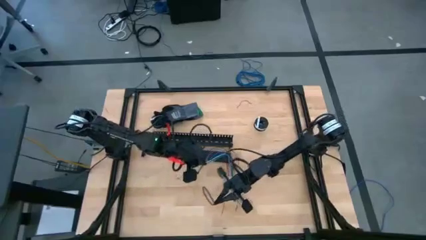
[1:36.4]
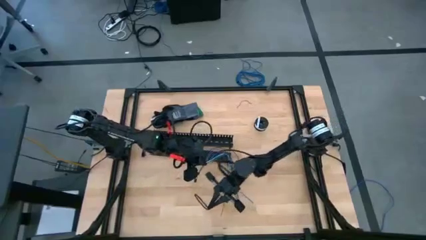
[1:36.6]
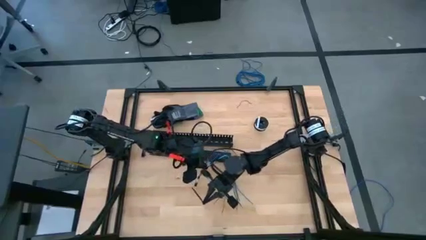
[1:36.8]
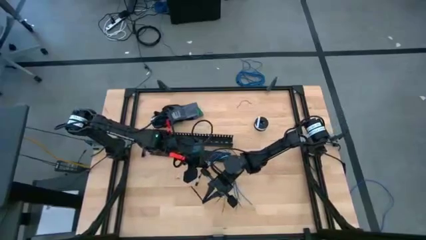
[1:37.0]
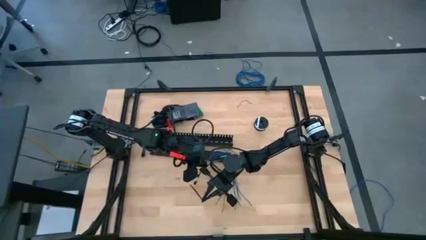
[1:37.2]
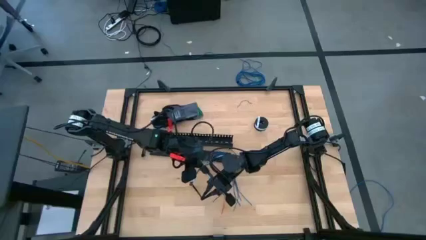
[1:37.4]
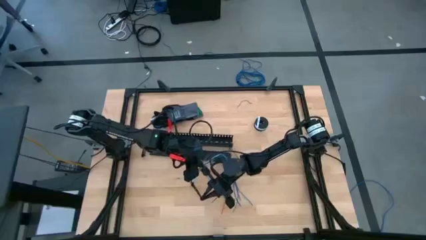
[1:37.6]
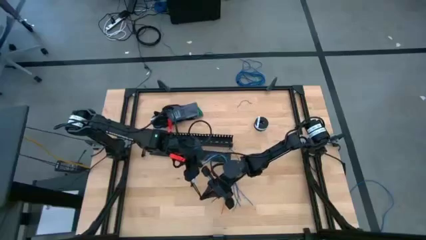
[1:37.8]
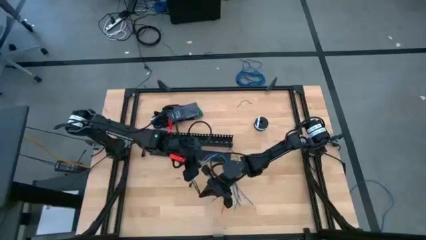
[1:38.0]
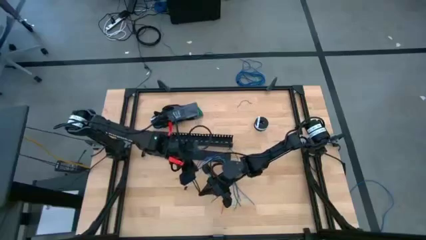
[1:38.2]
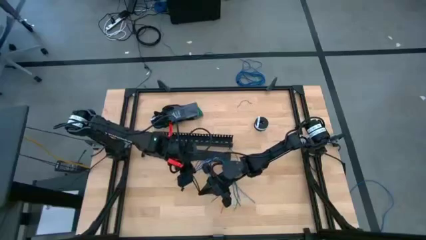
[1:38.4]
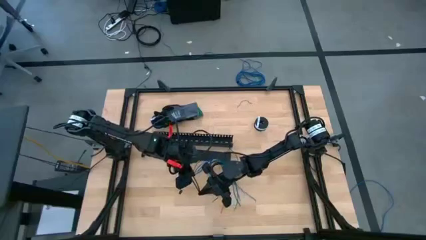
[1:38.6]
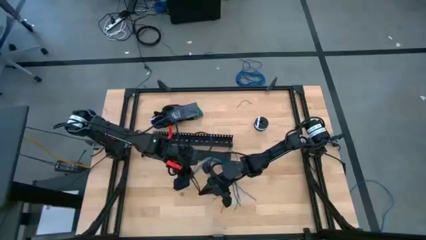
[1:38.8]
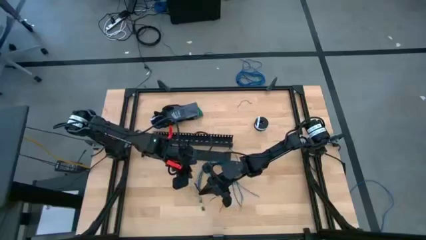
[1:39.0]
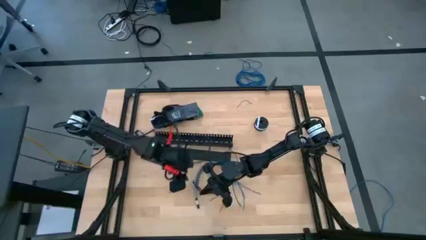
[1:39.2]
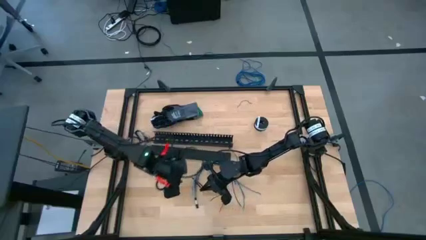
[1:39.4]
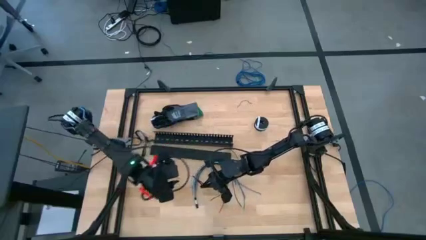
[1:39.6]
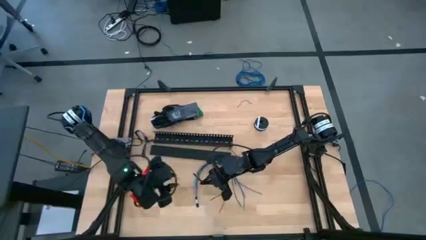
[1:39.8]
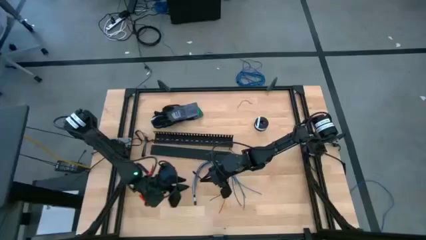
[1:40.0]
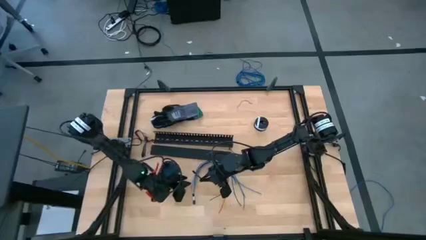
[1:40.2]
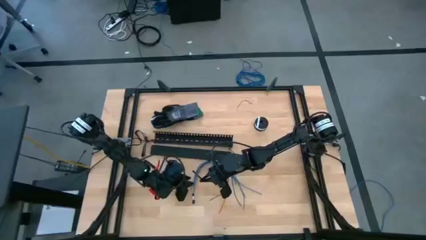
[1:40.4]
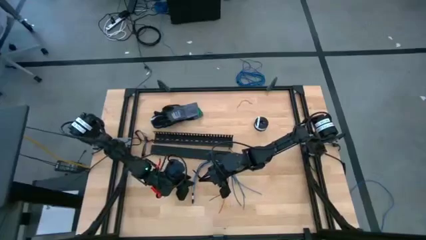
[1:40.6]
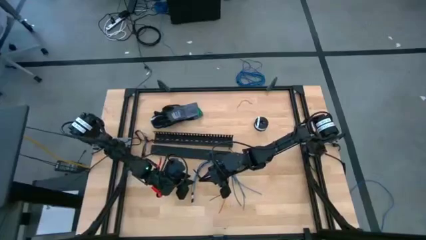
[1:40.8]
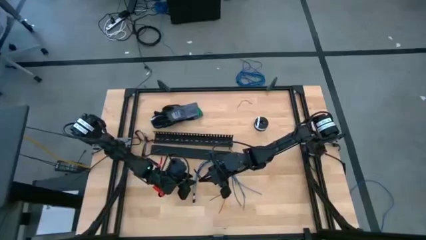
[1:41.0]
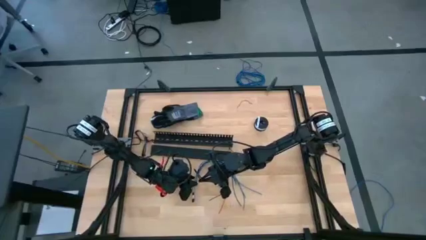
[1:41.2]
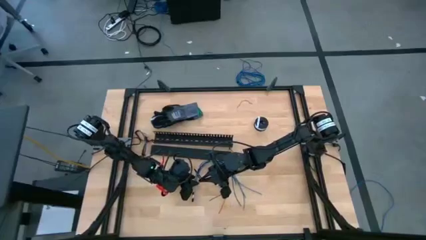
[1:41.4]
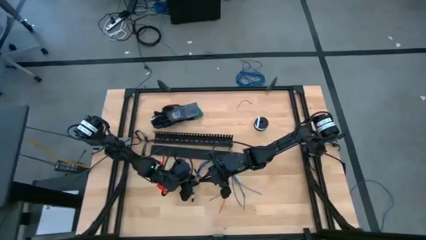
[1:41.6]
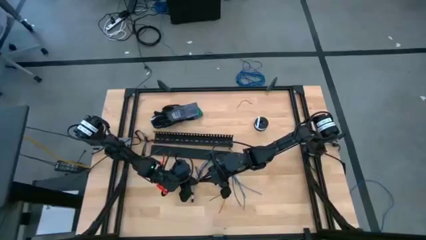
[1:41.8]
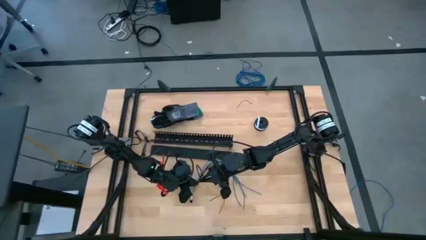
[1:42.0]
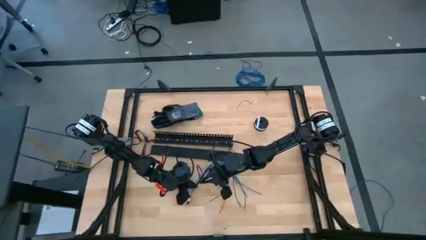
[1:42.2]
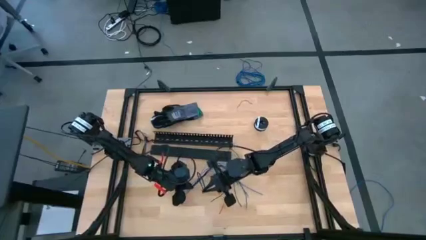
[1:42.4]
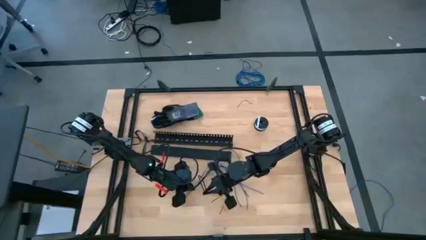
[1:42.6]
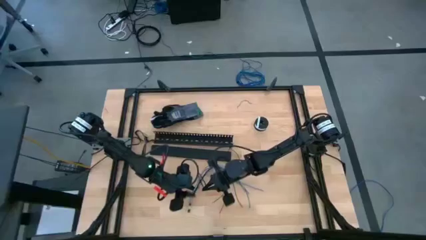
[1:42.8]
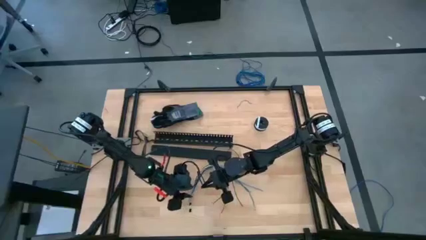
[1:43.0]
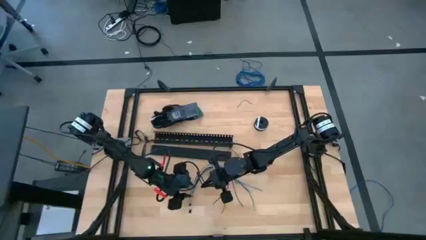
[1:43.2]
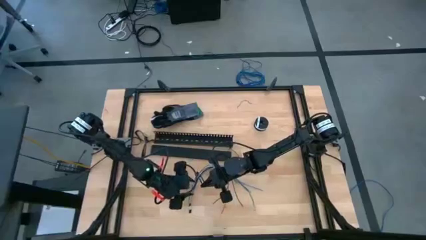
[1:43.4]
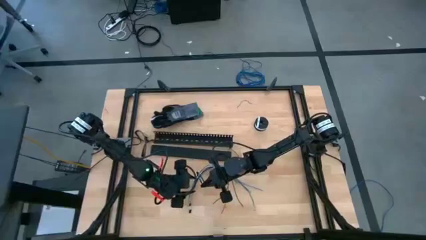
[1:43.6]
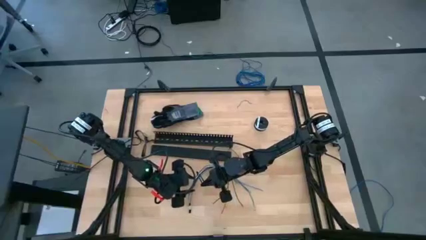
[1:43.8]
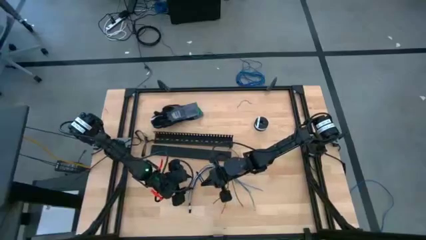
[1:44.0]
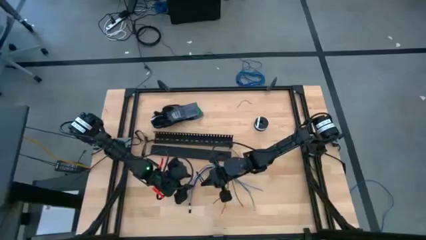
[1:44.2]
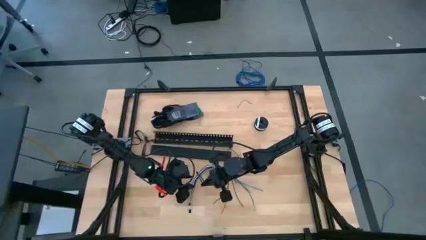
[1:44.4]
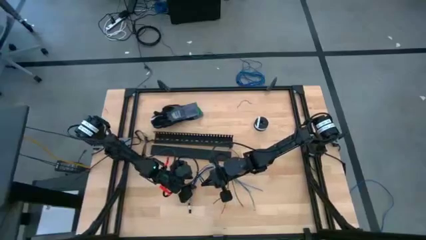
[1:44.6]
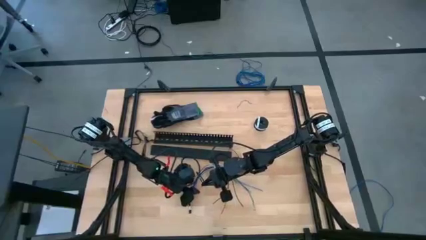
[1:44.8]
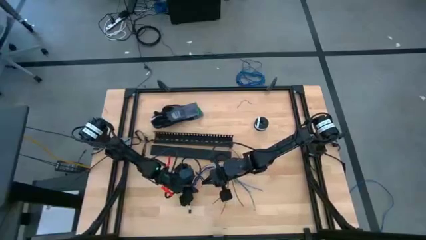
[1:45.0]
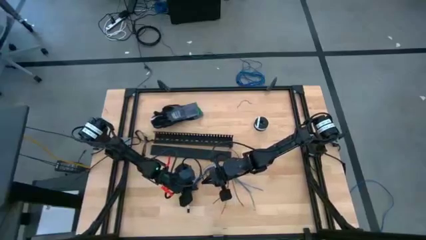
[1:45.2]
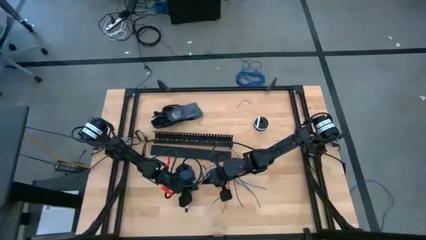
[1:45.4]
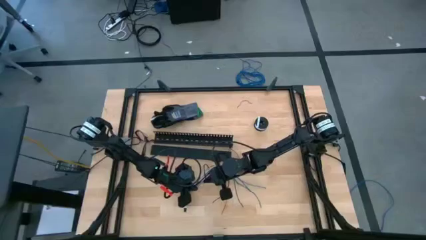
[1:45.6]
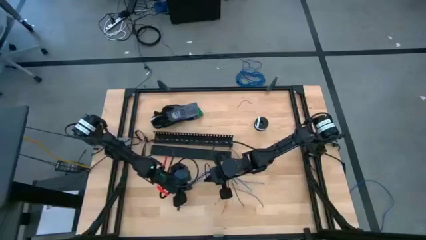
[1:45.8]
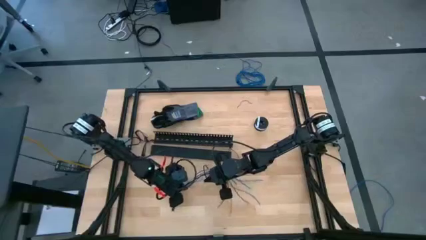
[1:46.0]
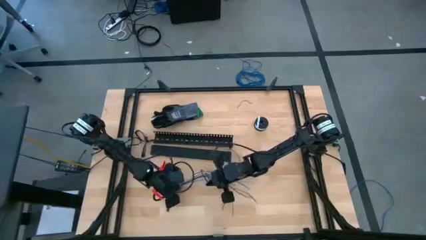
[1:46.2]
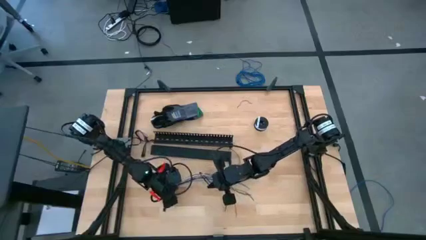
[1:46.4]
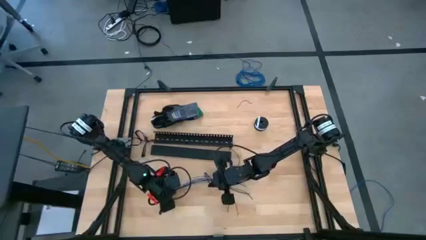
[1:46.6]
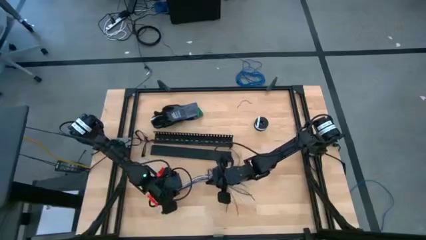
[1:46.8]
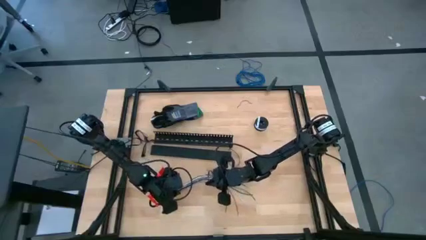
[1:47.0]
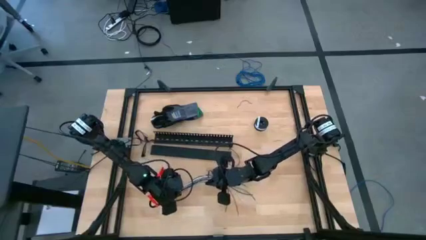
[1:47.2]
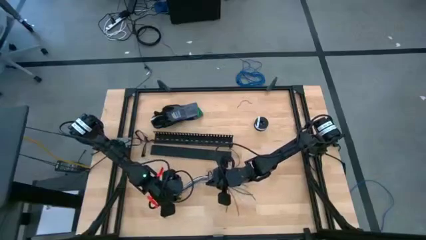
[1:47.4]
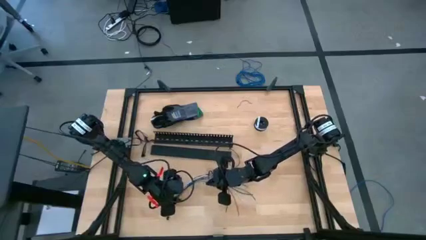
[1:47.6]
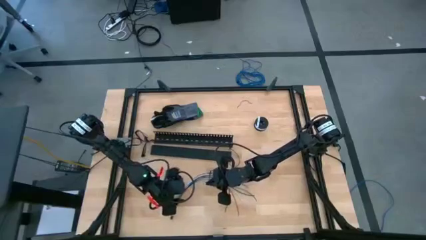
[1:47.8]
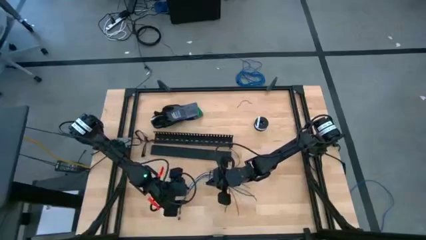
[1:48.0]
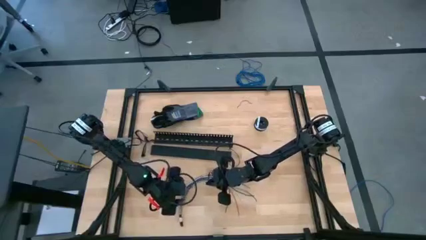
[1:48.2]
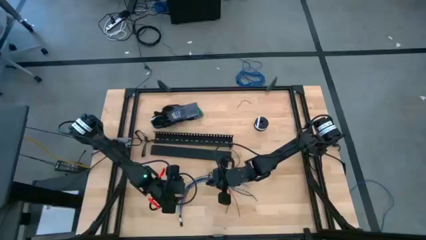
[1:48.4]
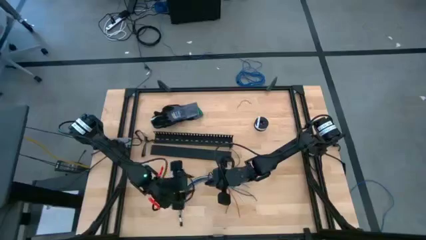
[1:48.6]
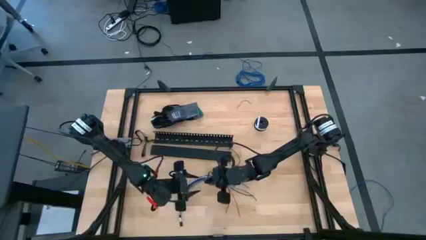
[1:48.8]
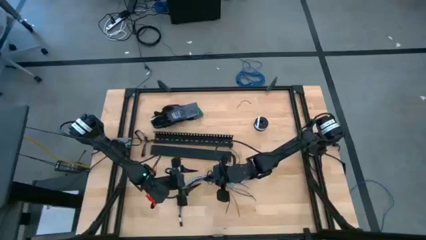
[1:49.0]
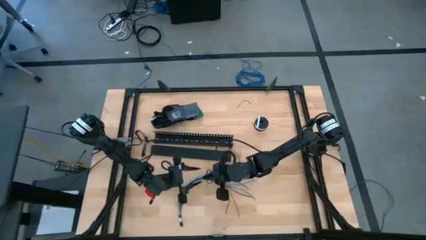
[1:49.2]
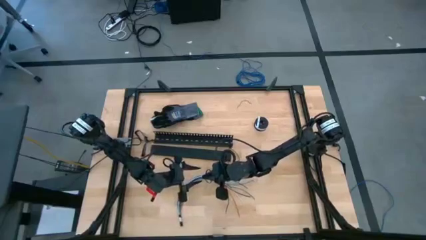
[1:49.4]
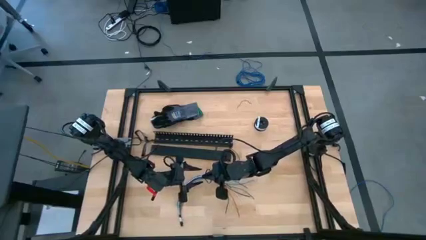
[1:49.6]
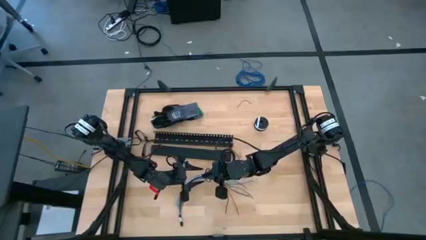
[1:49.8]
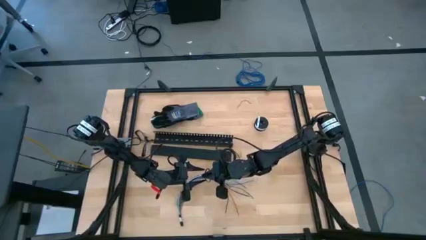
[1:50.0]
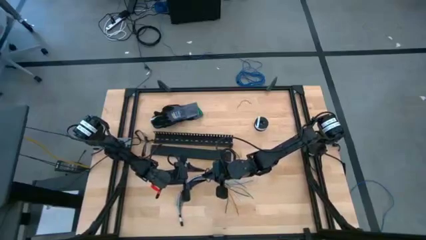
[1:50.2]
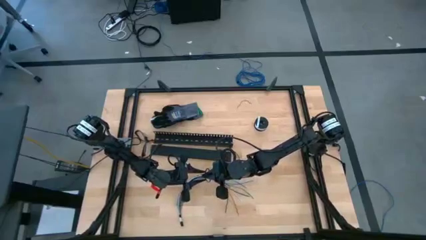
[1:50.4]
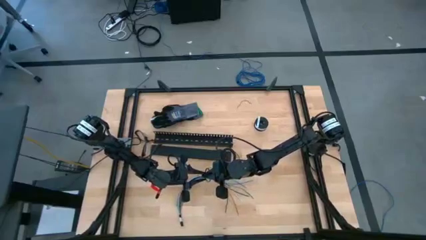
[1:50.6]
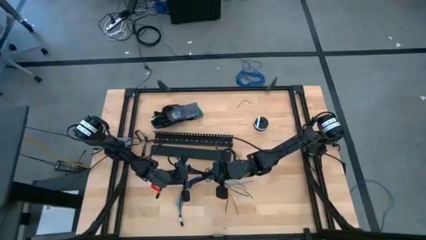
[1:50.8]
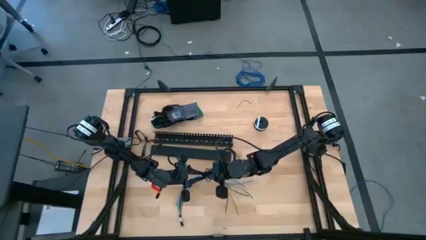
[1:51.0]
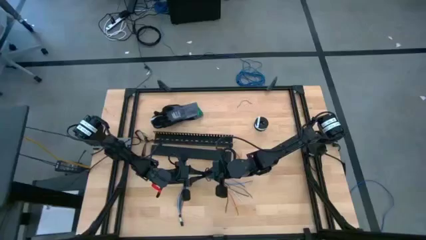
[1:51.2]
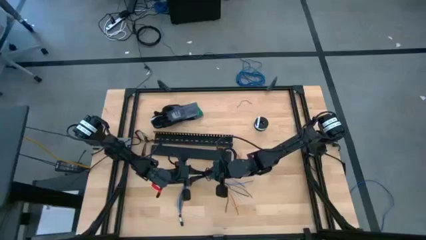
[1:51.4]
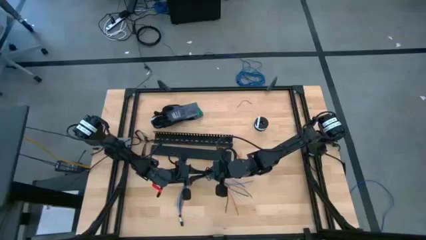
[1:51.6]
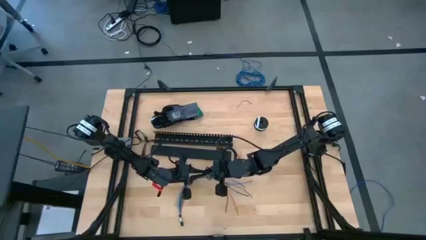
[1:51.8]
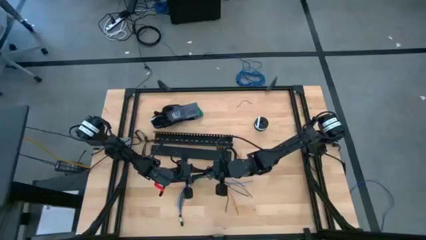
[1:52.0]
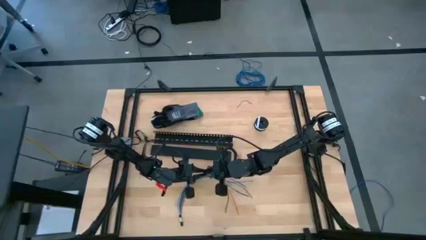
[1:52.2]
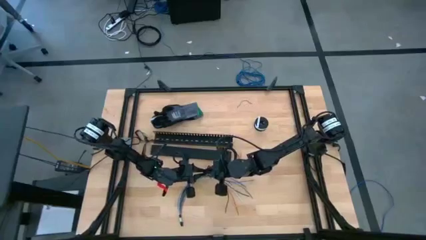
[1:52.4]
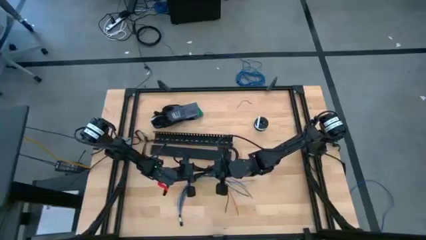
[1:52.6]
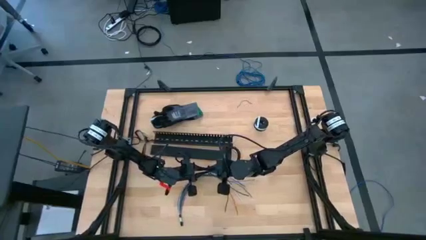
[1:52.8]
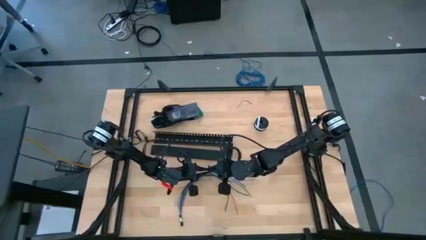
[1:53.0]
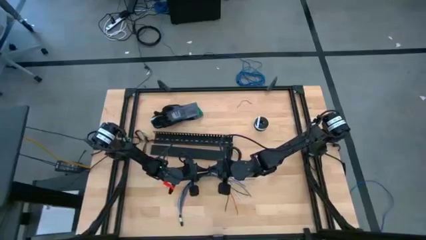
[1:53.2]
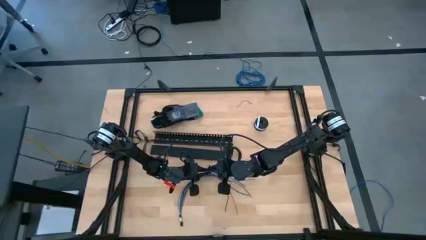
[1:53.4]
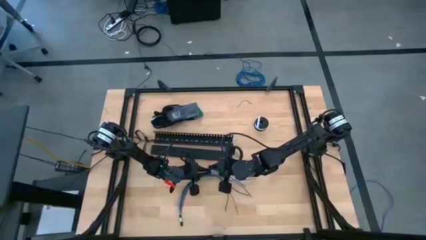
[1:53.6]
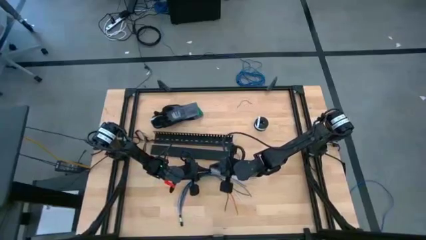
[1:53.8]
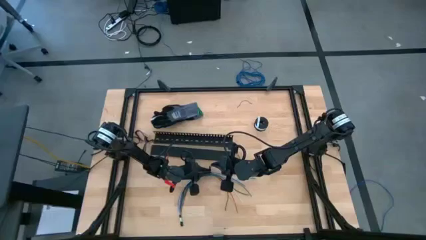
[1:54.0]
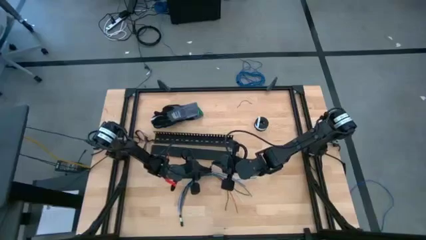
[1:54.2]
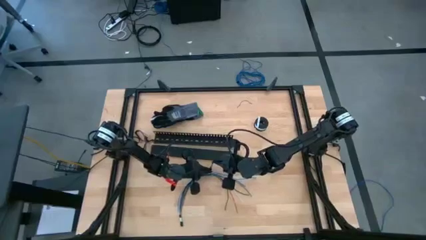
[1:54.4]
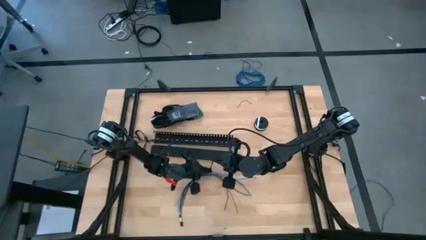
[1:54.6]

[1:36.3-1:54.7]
Task: Ziptie cables
Wrap the right black zip tie on the cables
